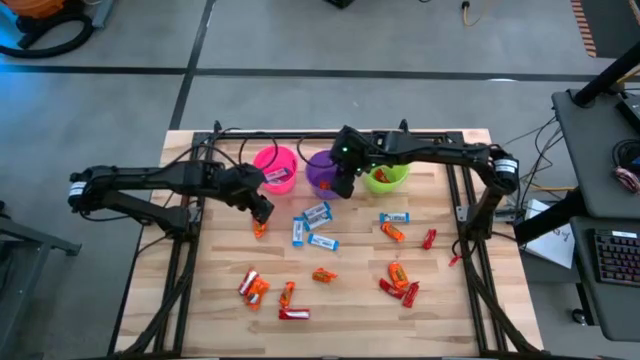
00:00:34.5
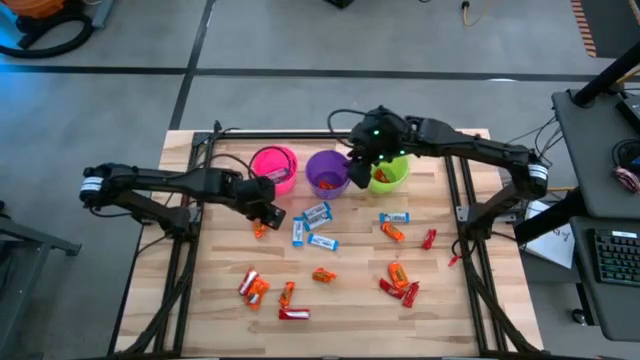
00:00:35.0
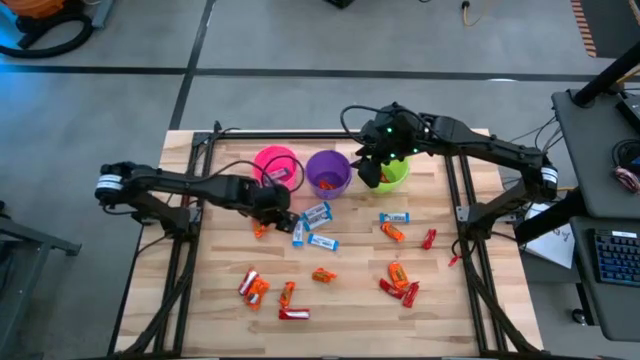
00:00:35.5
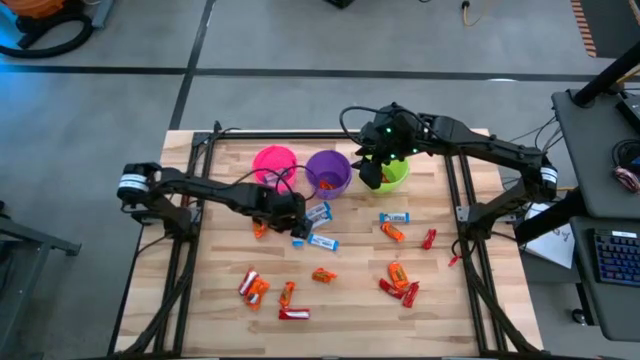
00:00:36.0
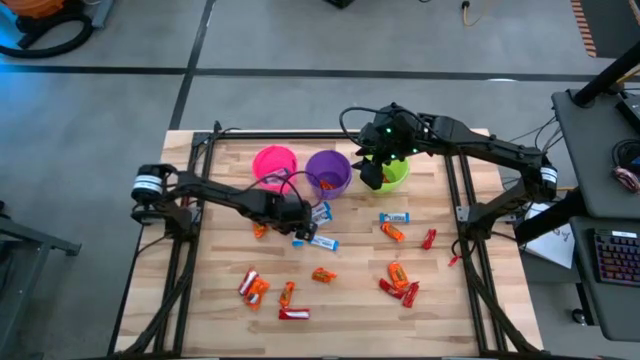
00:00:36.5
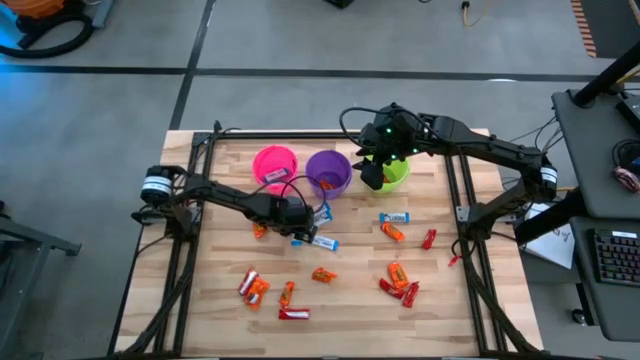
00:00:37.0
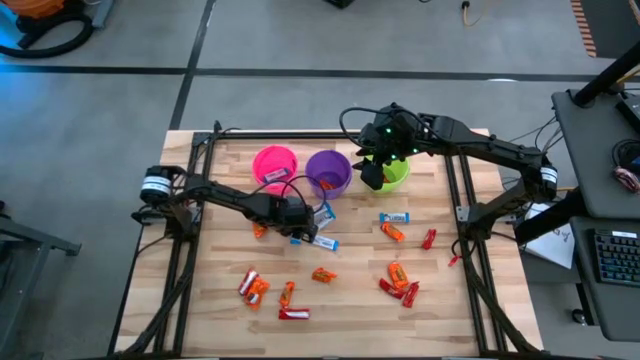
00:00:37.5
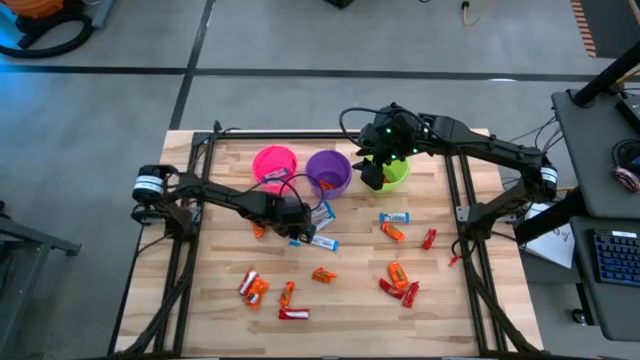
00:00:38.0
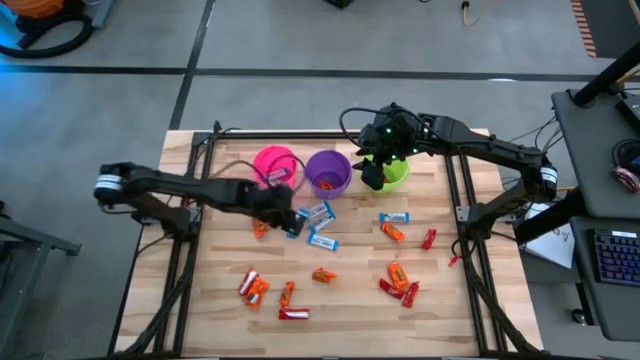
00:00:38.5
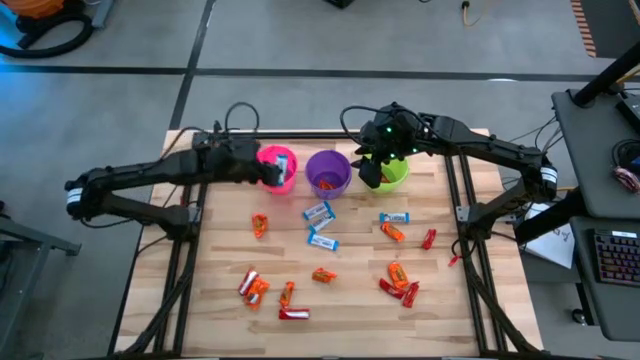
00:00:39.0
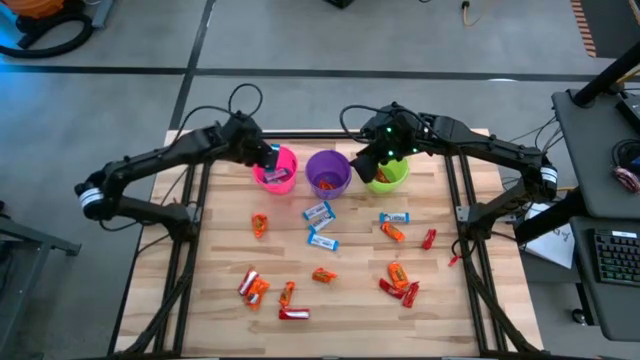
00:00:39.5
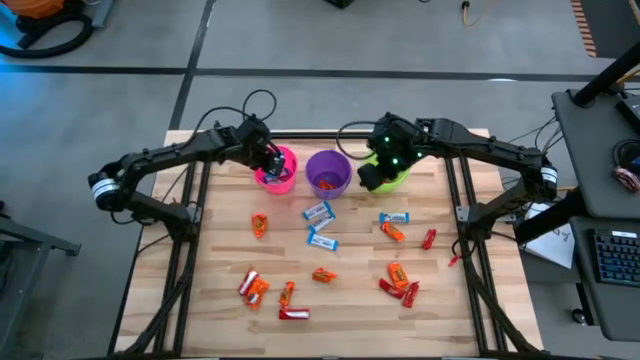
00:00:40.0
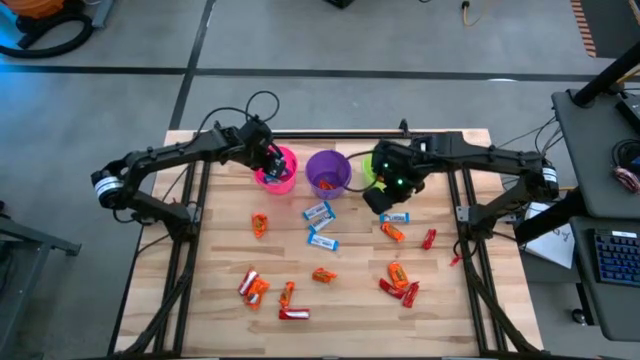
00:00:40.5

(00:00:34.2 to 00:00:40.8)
Task: Organize candy in baskets
Put the white chocolate into the pink bucket

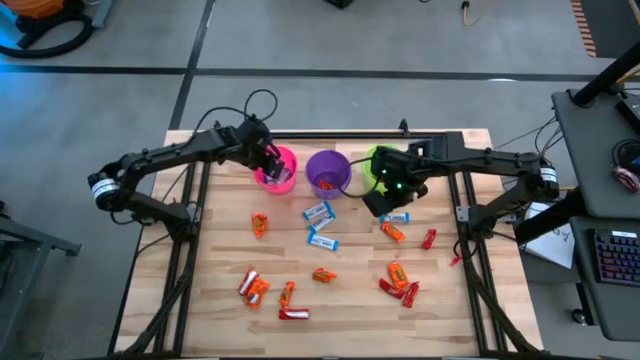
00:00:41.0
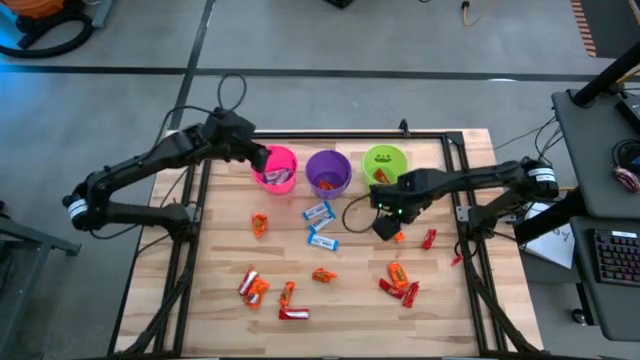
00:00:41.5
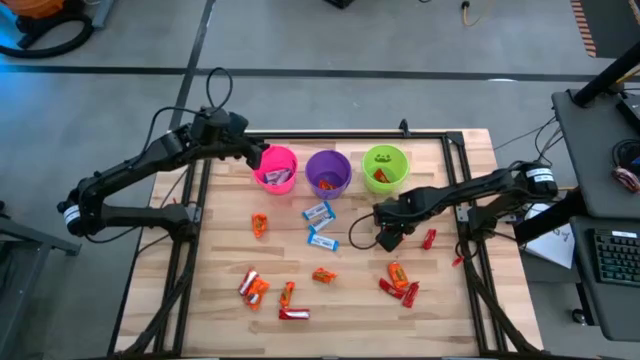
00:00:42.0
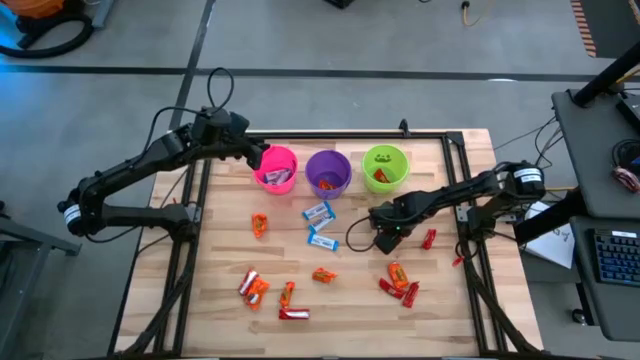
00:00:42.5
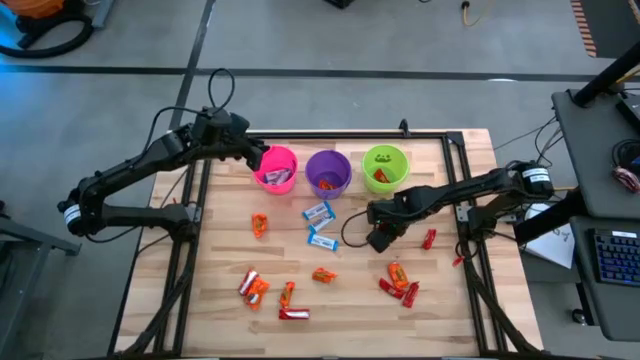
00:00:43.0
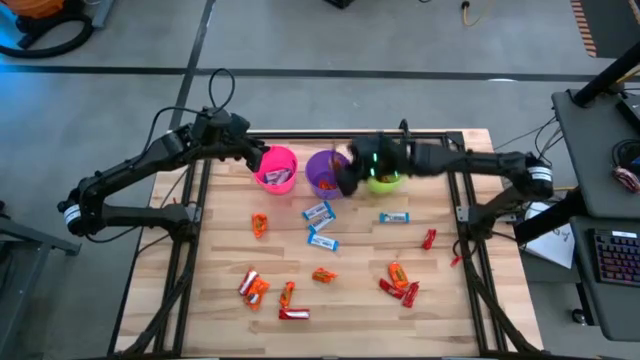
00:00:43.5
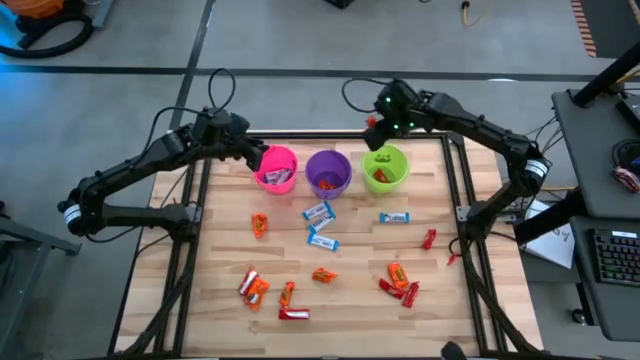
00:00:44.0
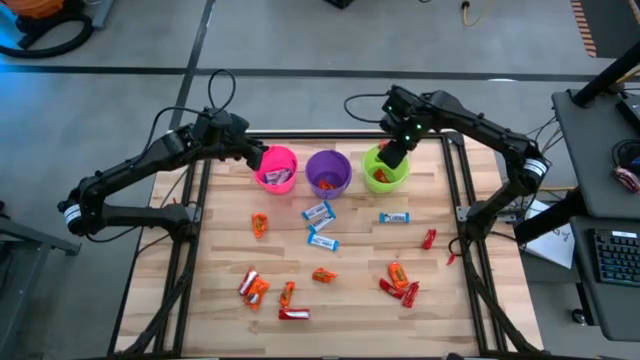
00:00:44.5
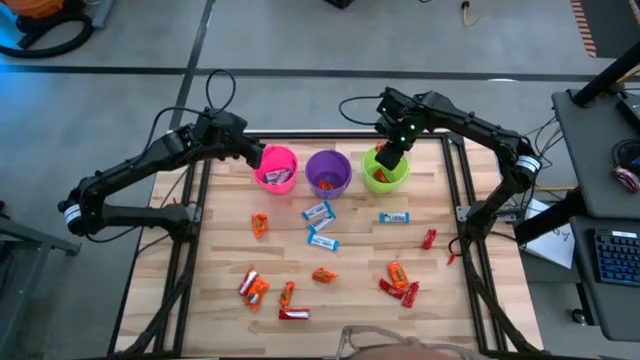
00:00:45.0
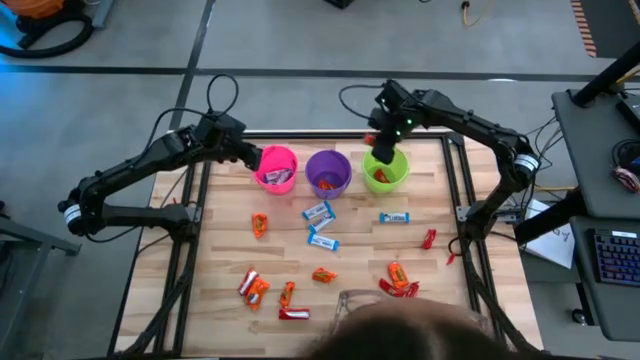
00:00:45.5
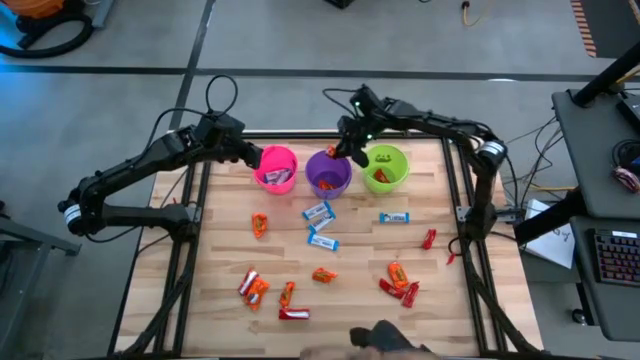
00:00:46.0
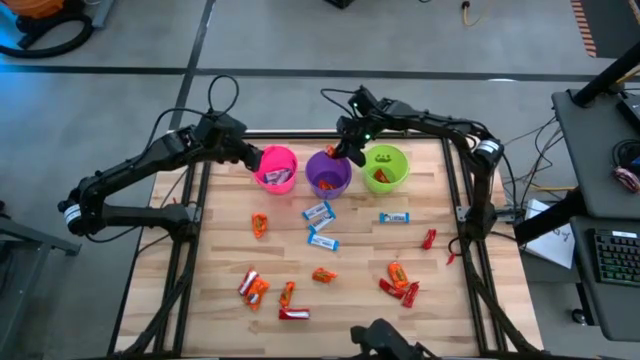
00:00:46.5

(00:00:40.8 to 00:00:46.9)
Put the orange chocolate into the violet bucket

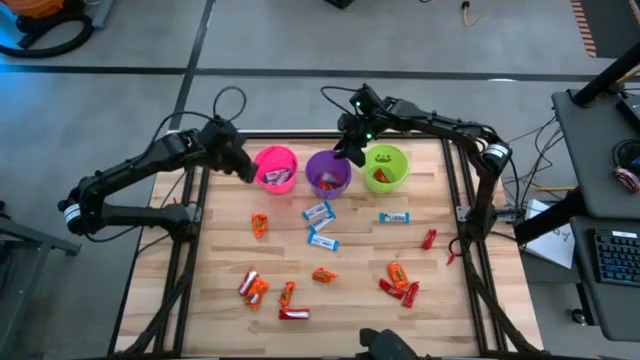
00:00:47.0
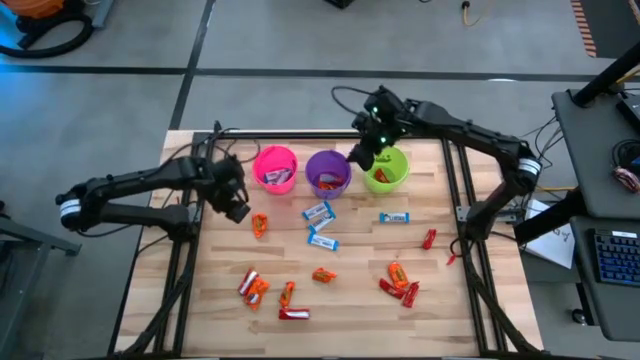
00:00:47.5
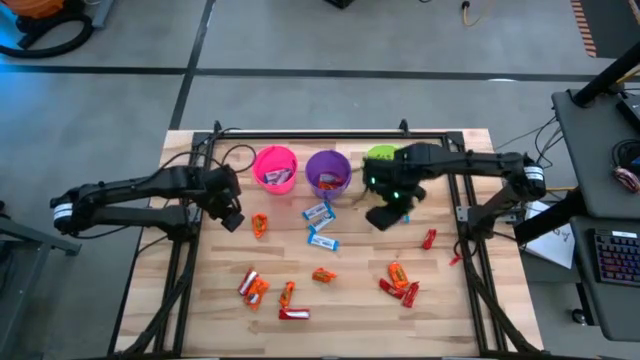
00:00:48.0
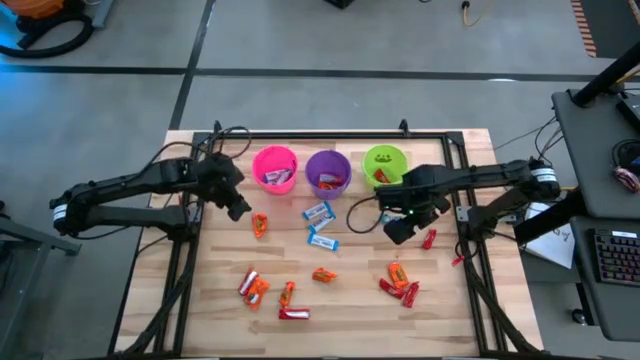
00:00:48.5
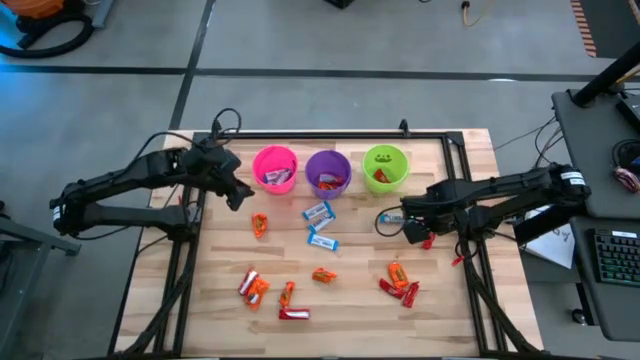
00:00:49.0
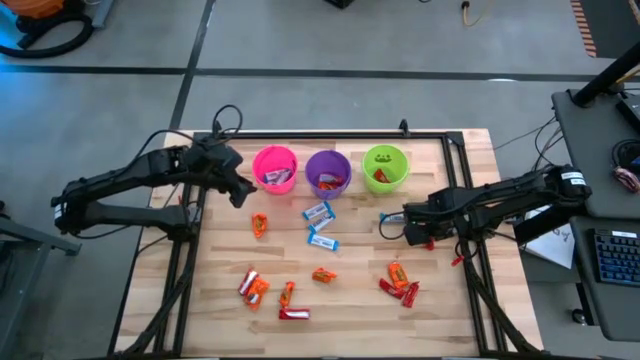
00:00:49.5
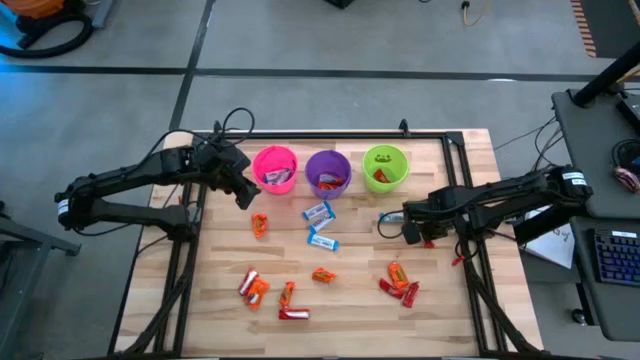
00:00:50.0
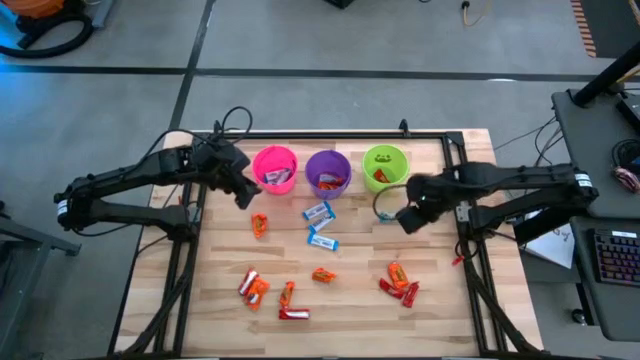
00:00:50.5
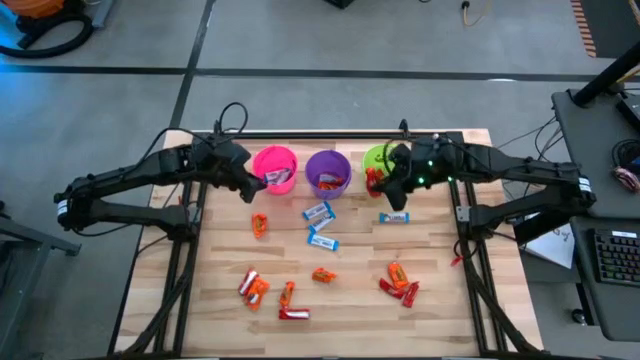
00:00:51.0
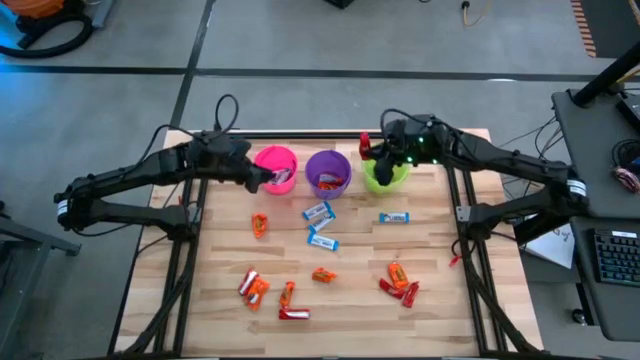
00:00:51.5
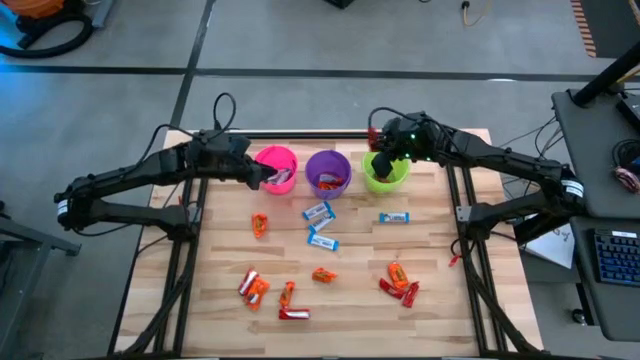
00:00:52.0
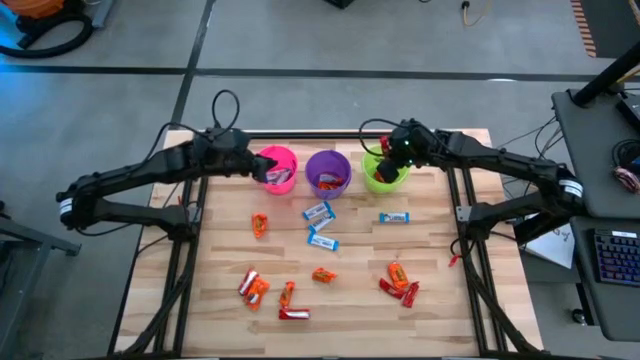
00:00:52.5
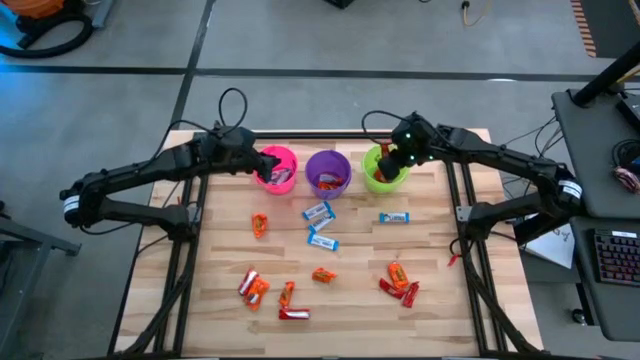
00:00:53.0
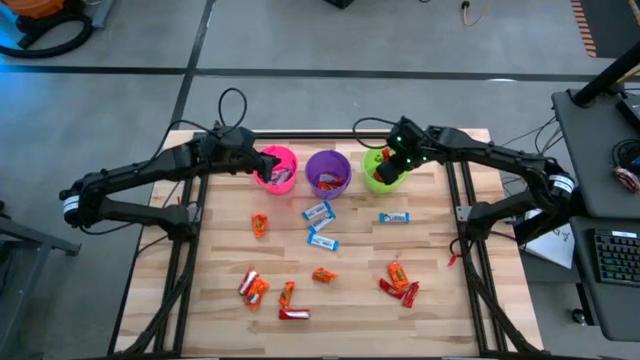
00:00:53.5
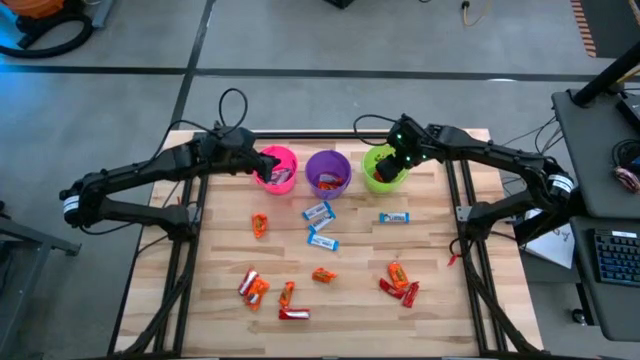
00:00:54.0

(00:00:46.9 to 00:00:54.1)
Put the red chocolate into the green bucket

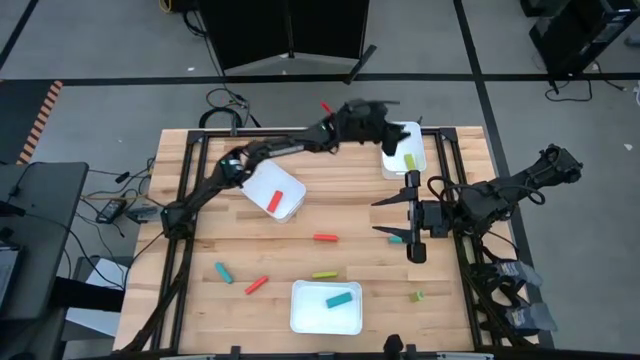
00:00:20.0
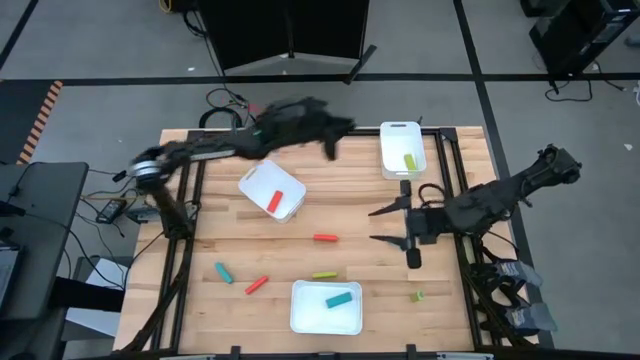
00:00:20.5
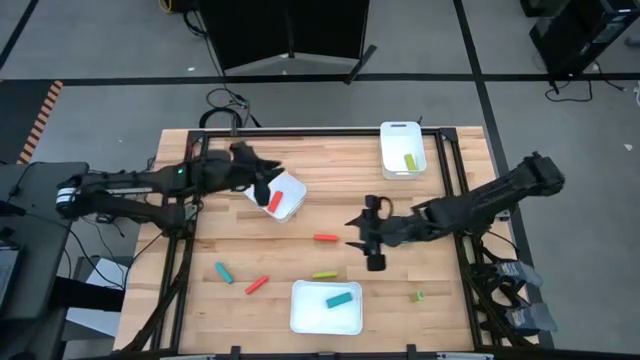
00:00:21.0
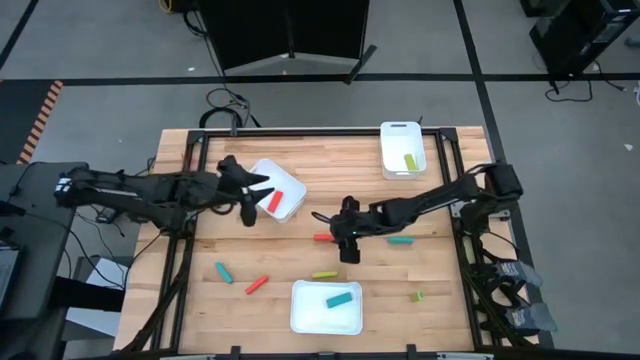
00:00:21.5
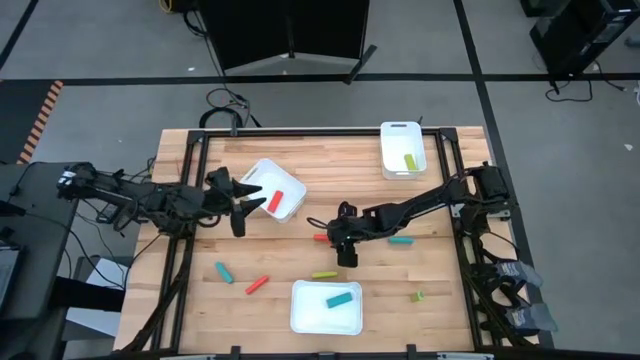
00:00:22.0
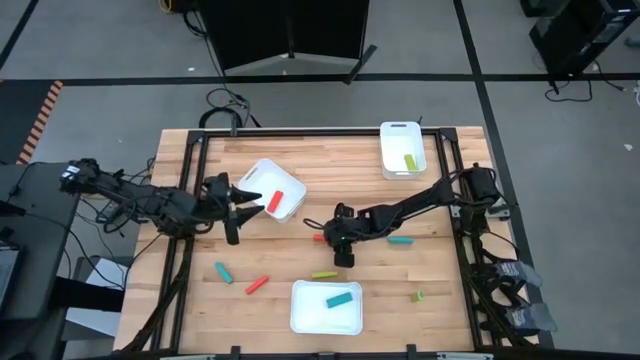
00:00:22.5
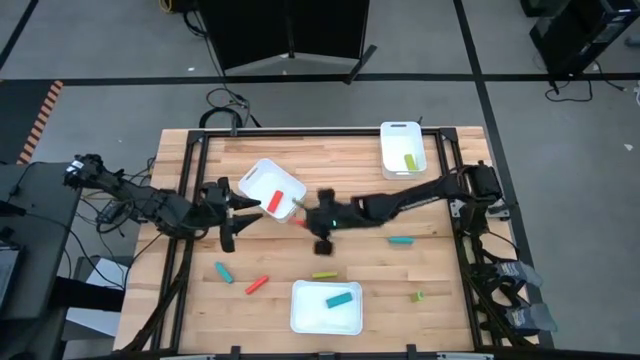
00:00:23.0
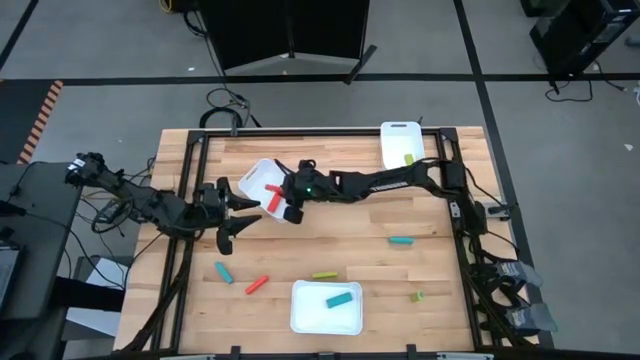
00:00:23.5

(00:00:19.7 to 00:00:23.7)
Task: Sort blocks
Put the right orange block into the top left bin
